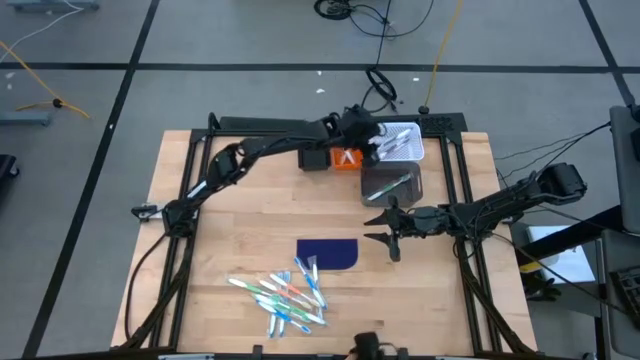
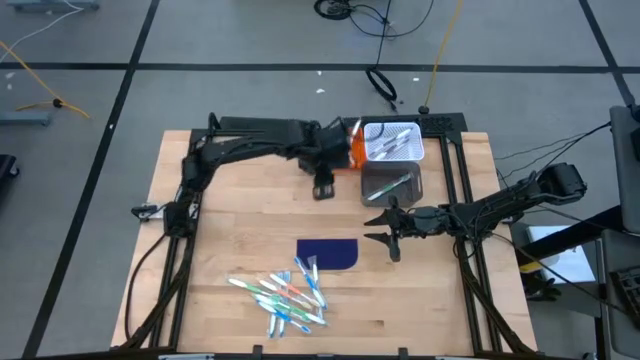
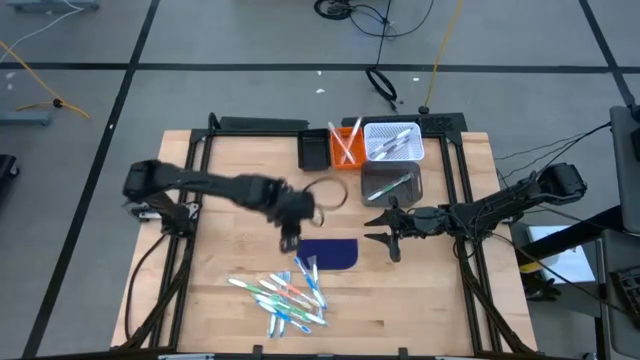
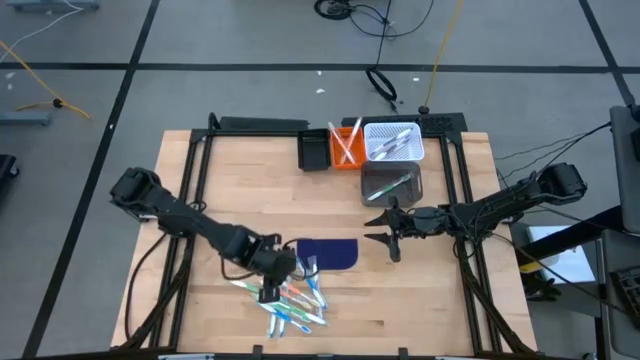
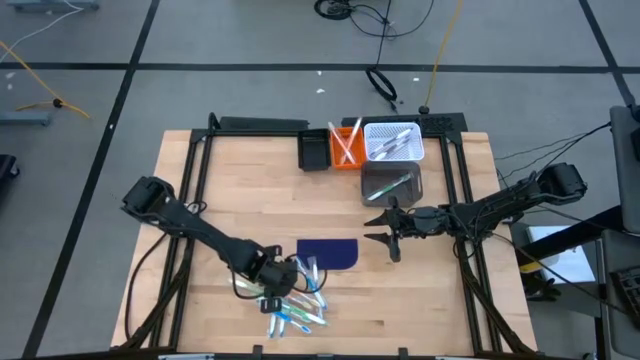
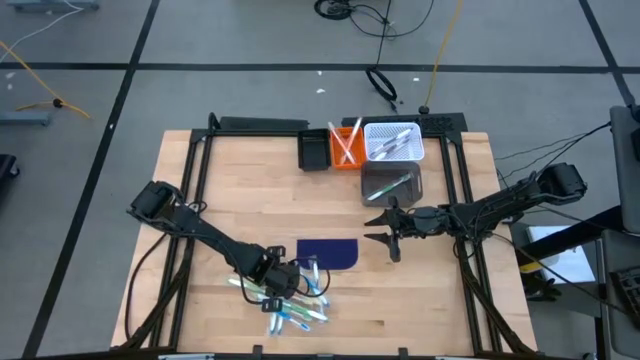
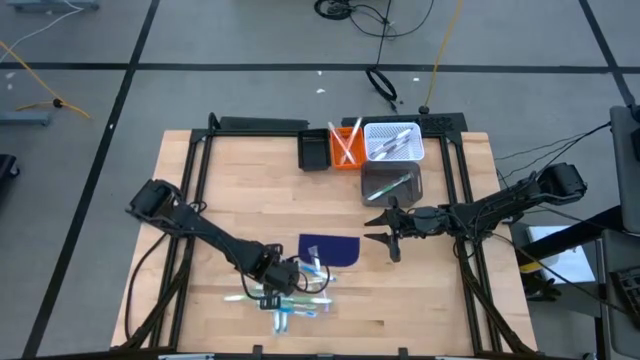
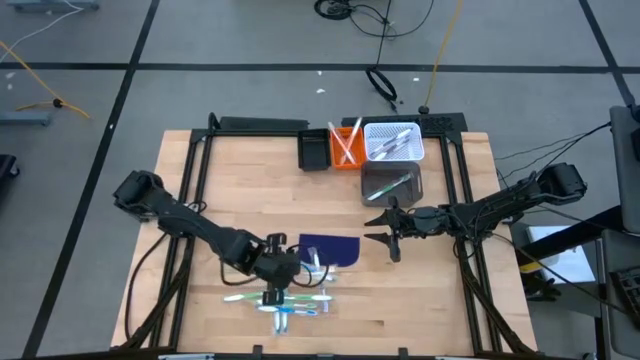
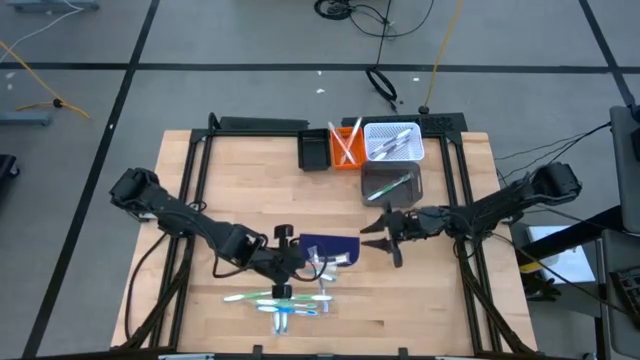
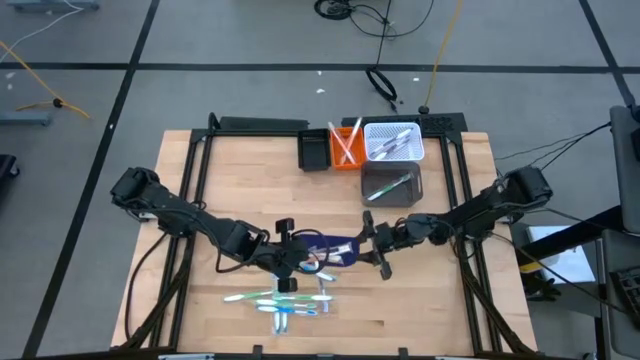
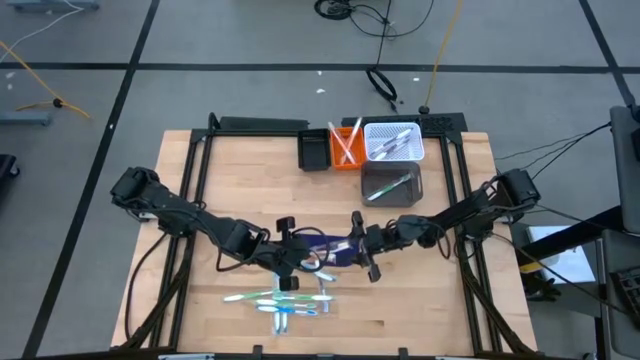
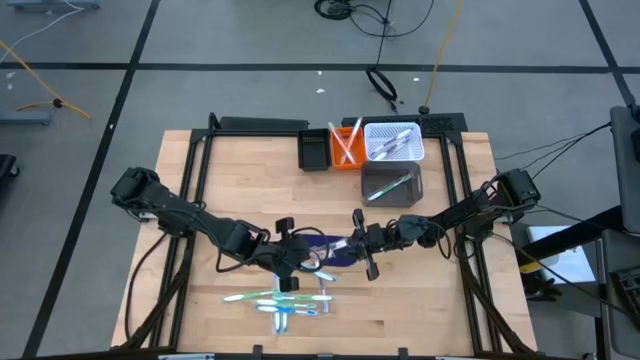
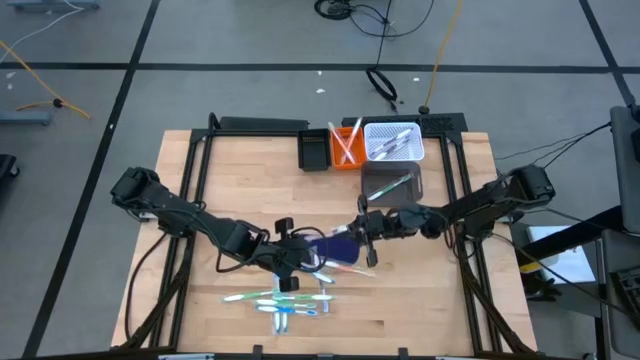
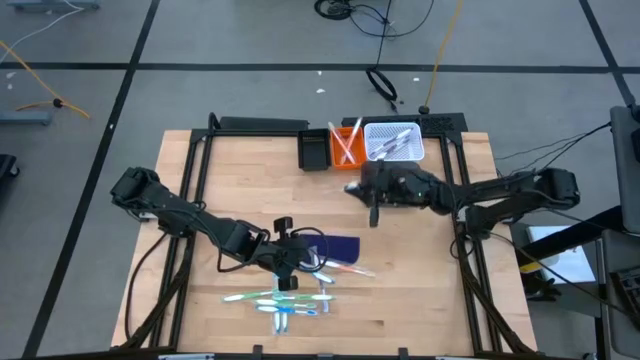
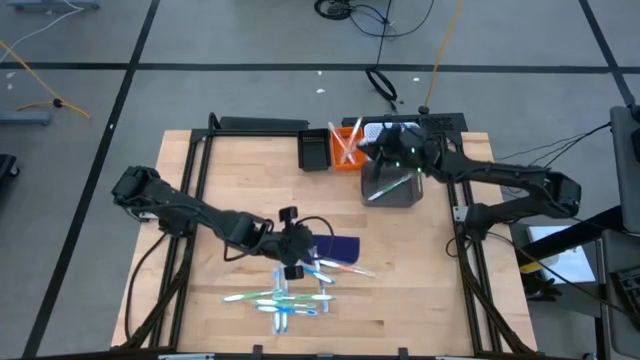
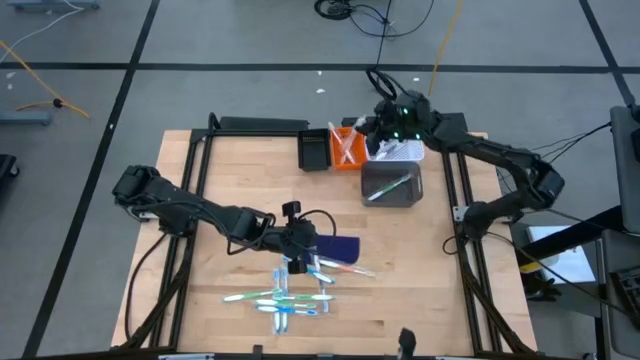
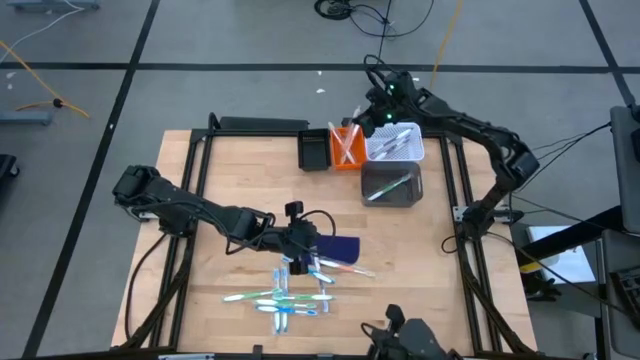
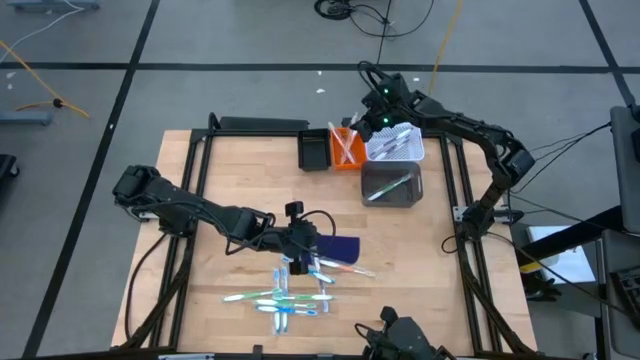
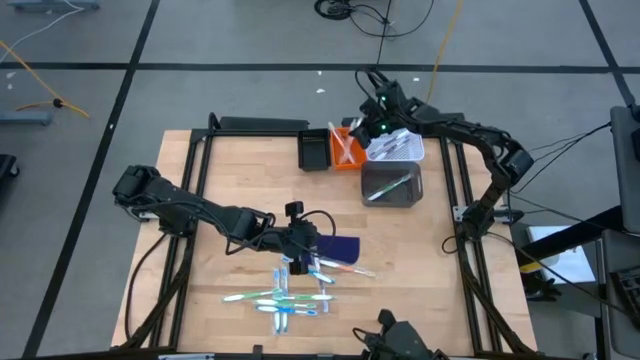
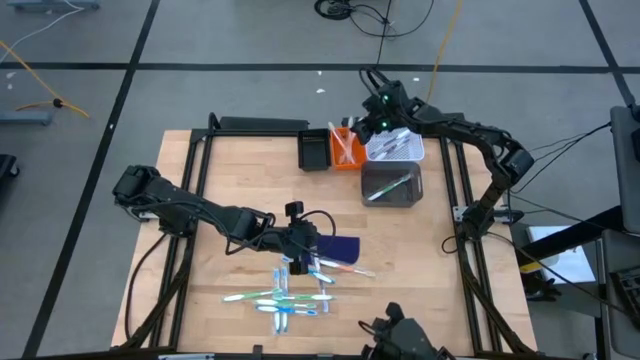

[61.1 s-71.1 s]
Task: Pick & Place Toothbrushes
Put the orange toothbrush into the orange bin

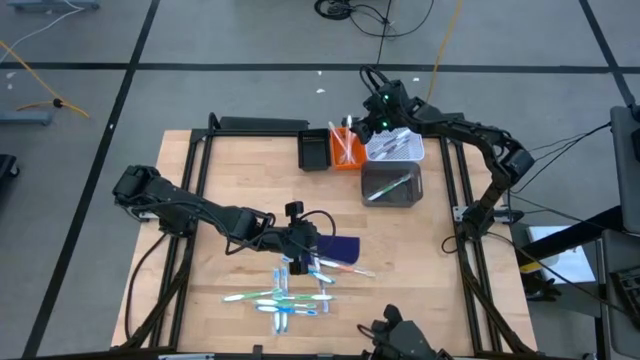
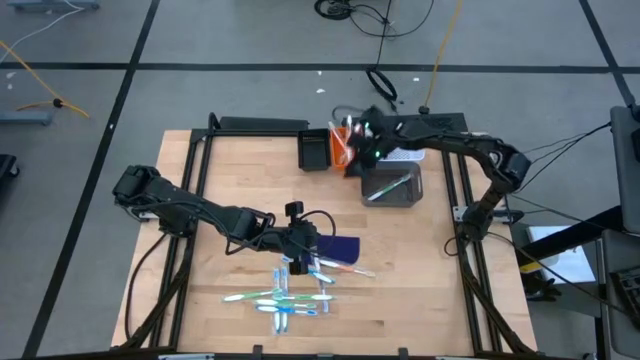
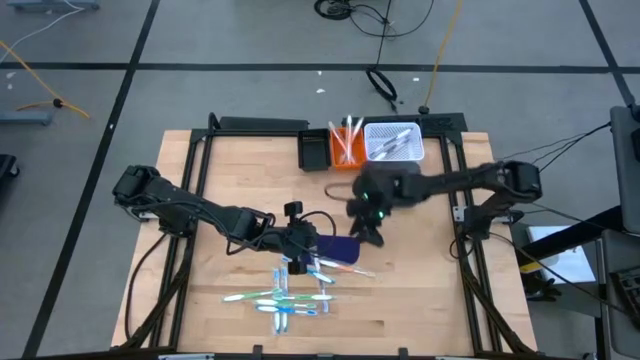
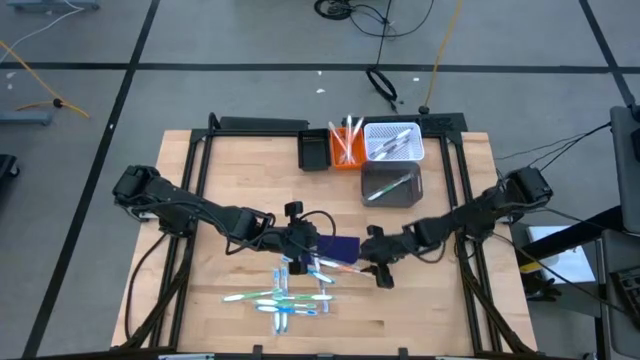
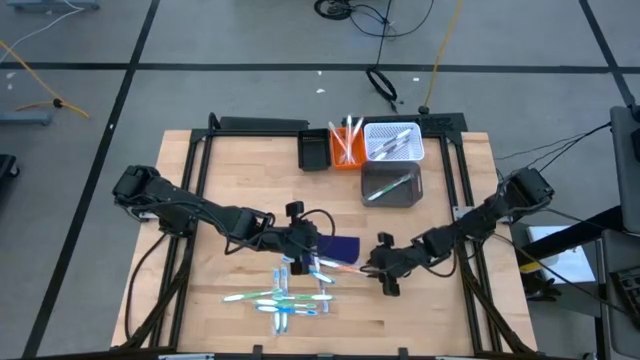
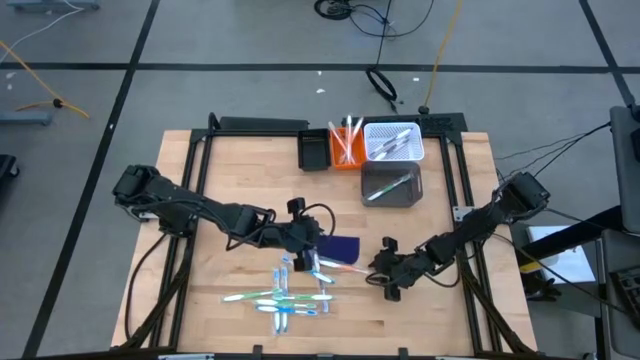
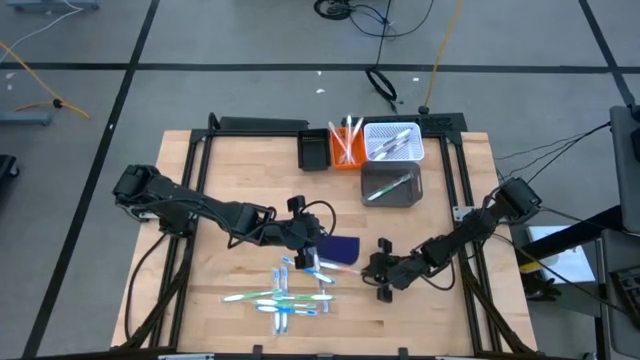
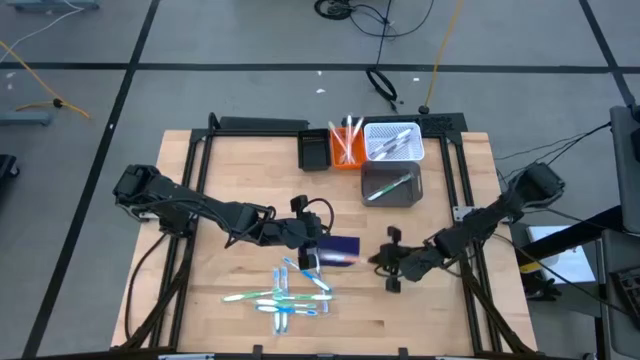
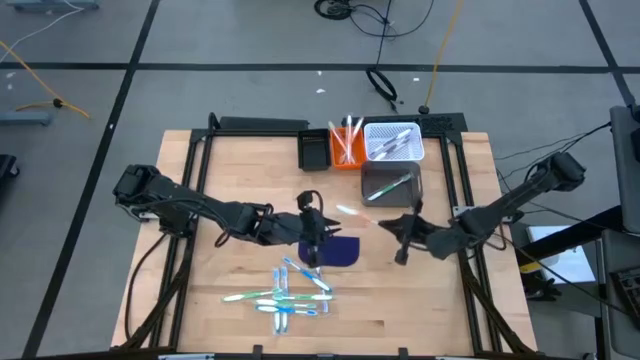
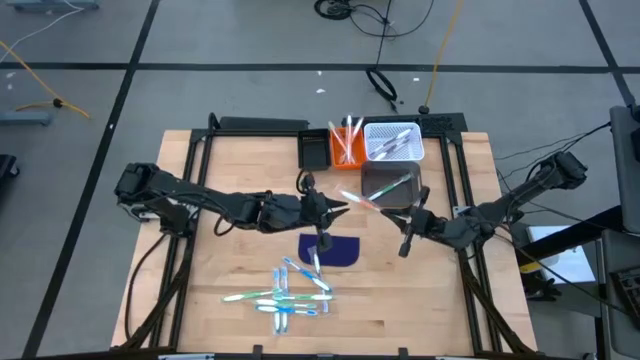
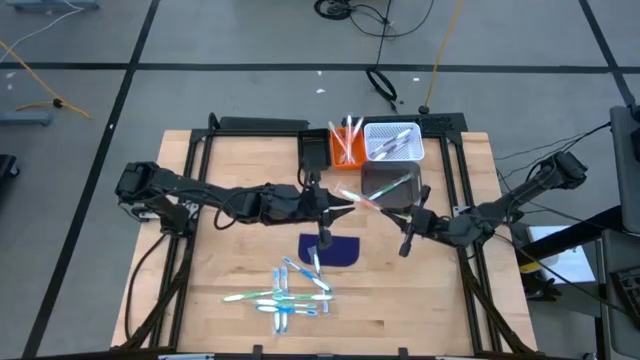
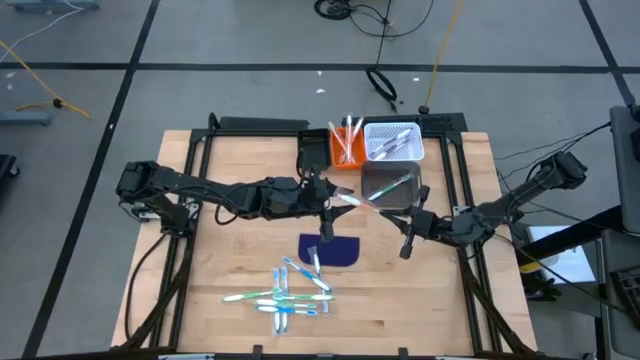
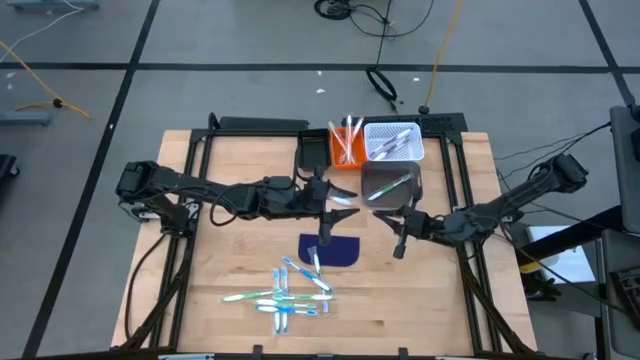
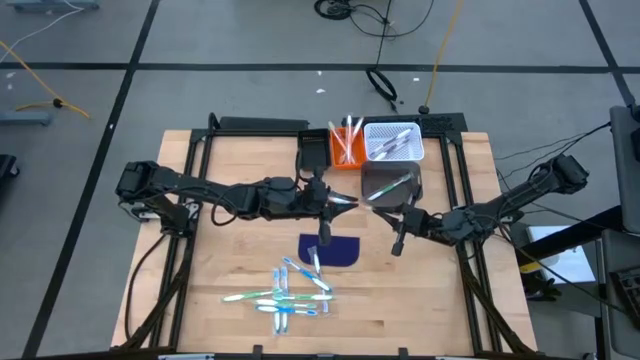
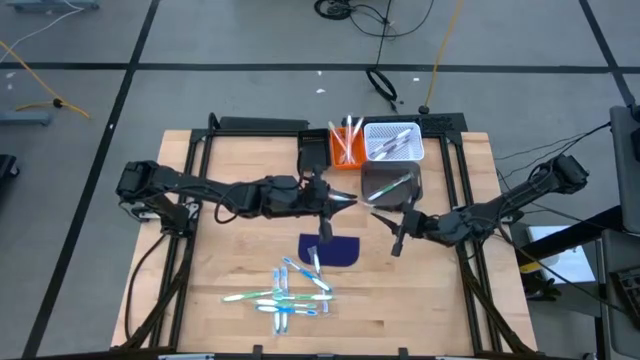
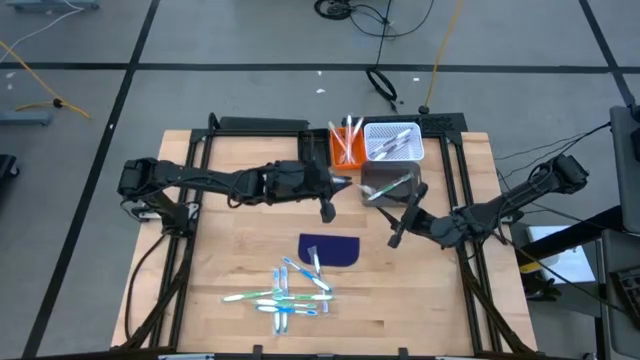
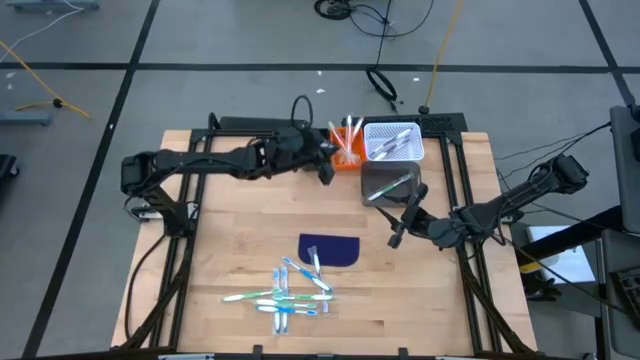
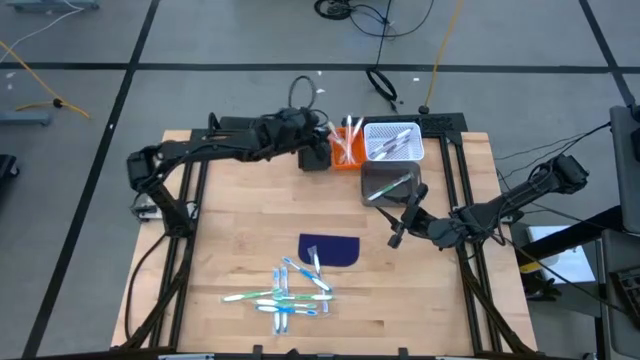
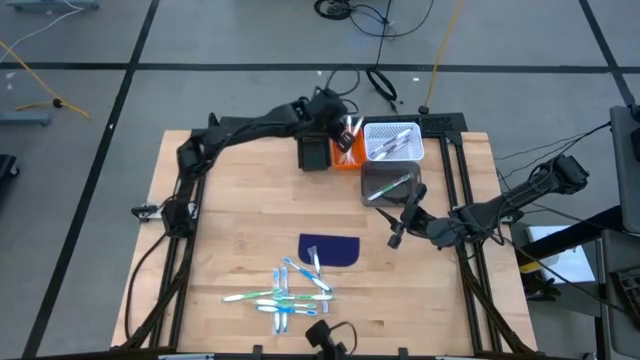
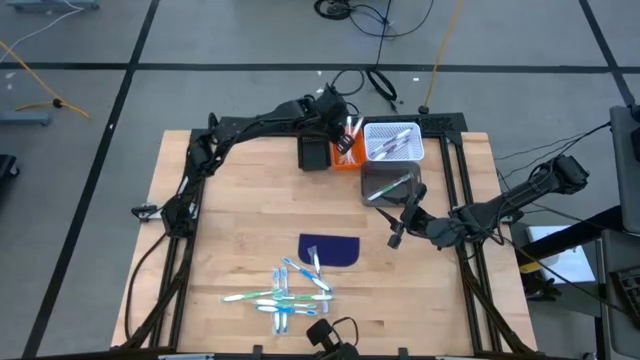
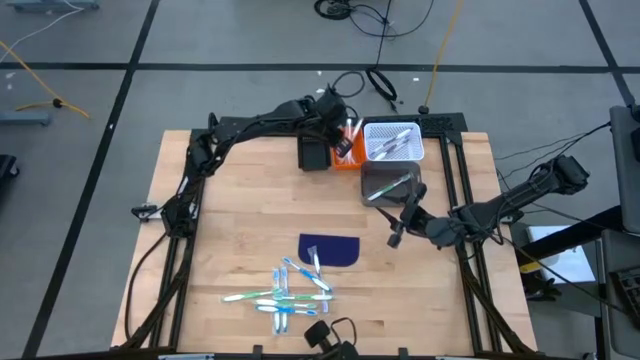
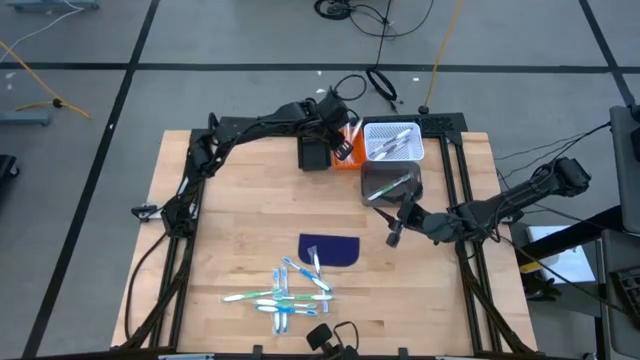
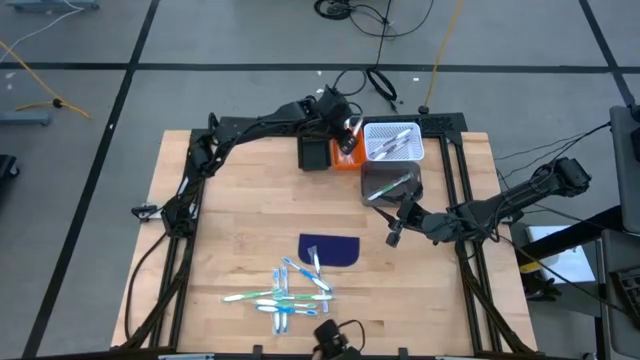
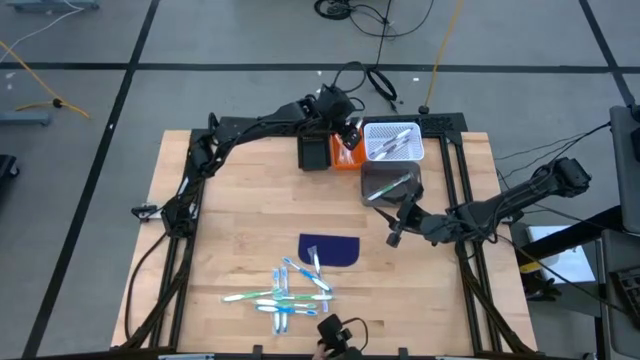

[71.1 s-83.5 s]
Put the orange toothbrush into the orange bin
